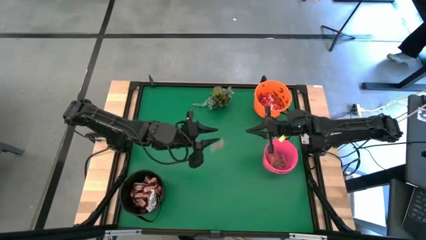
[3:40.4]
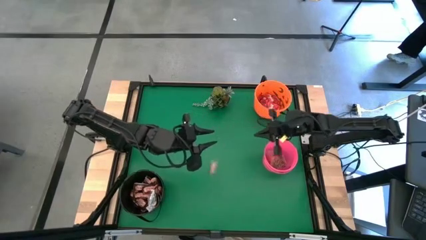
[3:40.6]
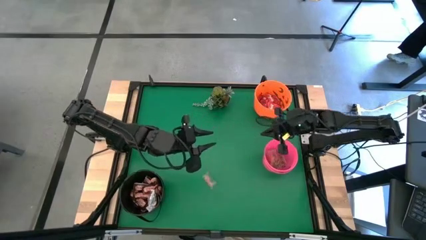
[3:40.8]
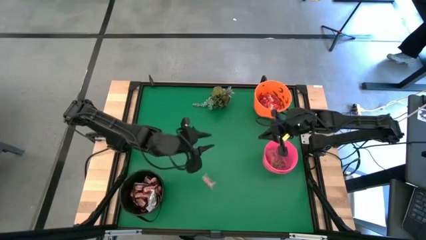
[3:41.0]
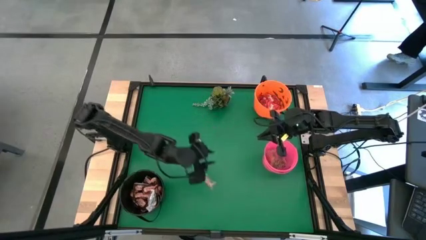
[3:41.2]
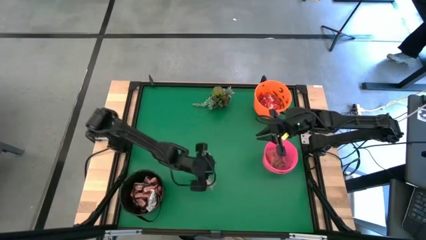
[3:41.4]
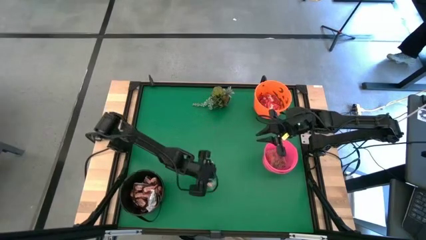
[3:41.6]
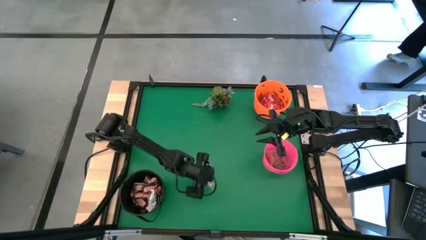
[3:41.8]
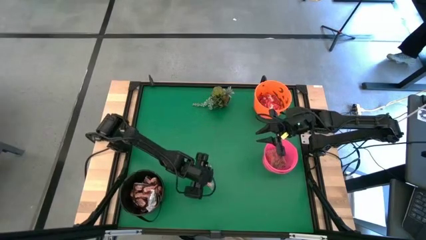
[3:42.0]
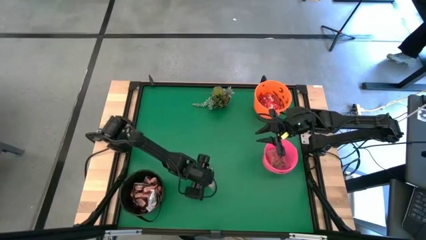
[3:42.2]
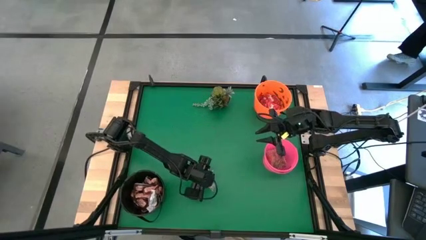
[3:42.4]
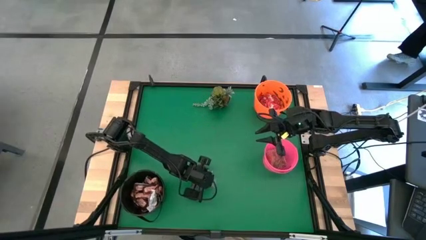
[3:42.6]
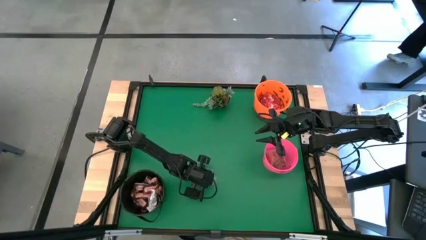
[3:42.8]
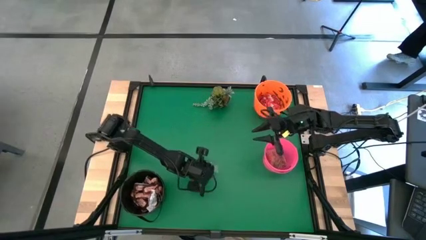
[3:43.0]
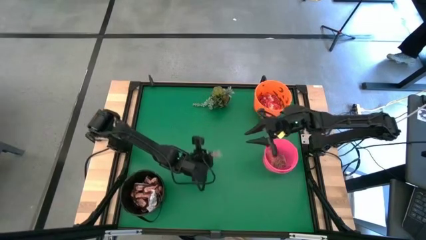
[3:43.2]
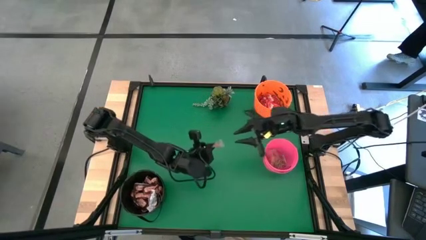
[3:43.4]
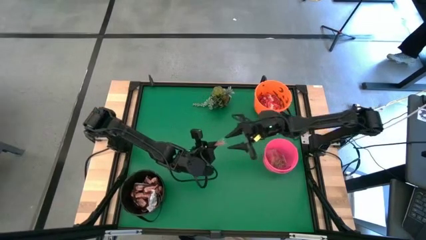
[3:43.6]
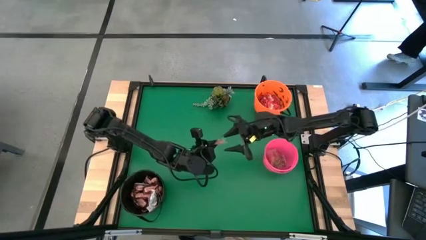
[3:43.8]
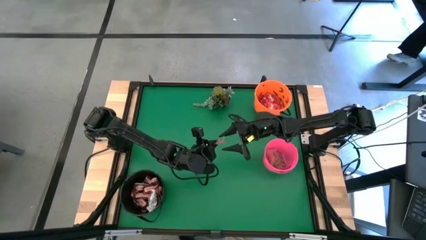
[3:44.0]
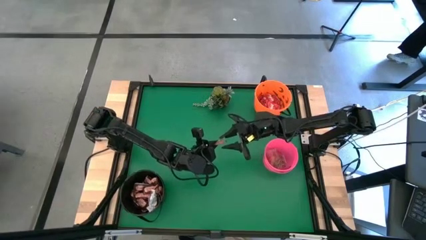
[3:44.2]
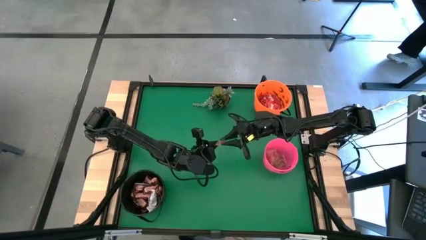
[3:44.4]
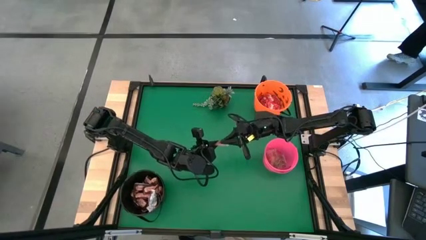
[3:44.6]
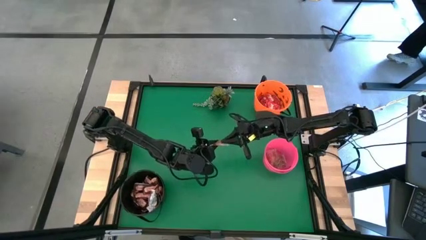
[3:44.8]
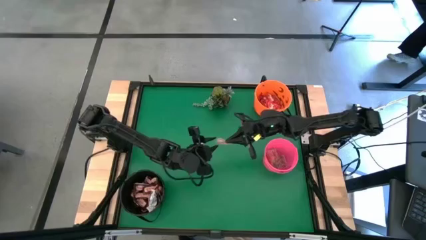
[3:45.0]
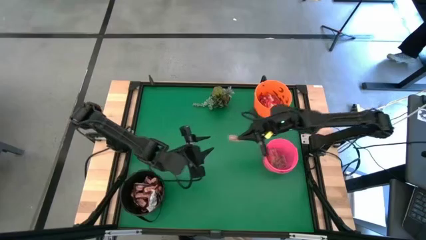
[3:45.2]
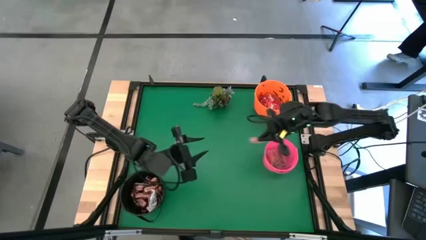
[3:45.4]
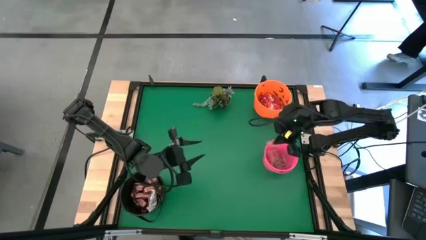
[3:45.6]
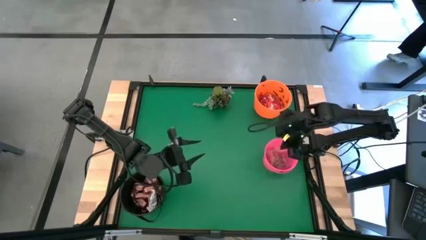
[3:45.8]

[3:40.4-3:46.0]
Task: Sort candy
Put the orange candy into the pink bucket

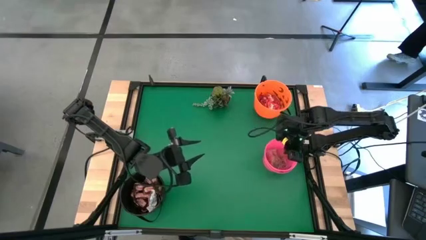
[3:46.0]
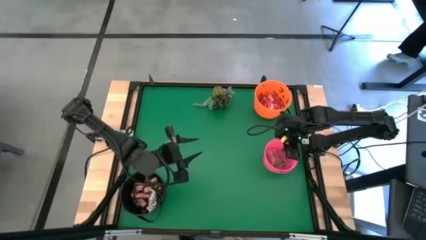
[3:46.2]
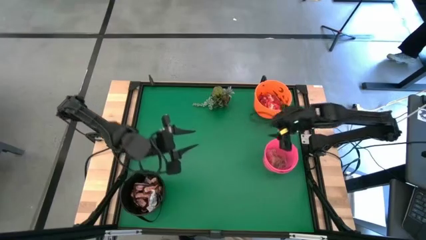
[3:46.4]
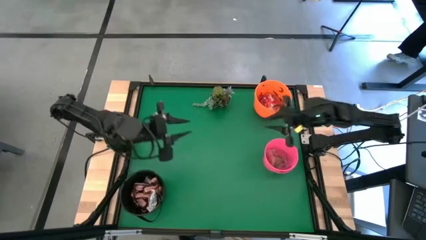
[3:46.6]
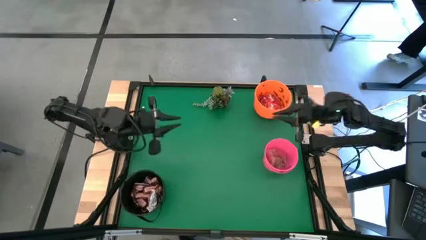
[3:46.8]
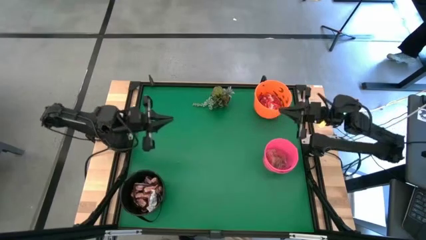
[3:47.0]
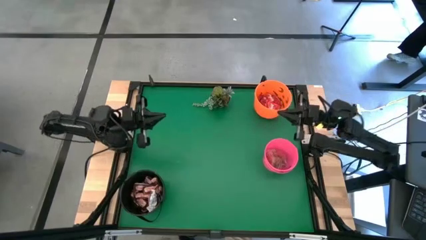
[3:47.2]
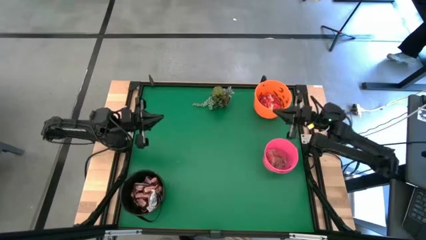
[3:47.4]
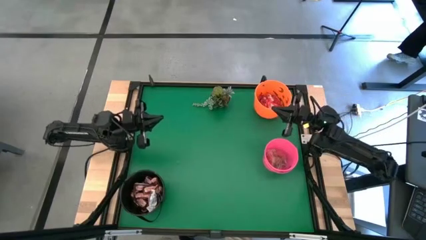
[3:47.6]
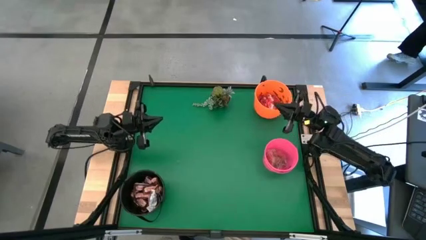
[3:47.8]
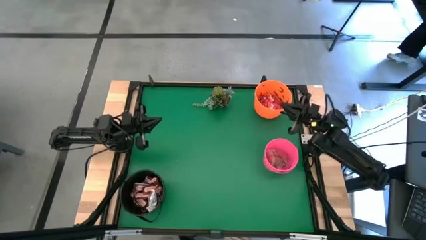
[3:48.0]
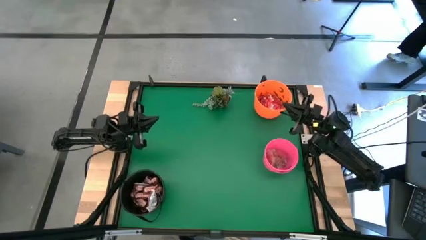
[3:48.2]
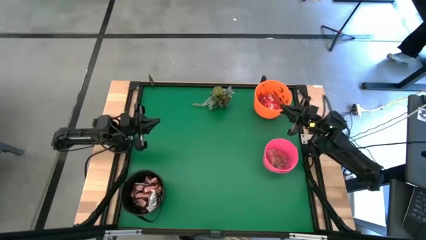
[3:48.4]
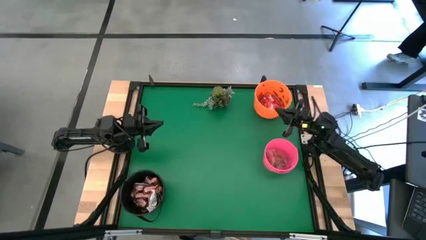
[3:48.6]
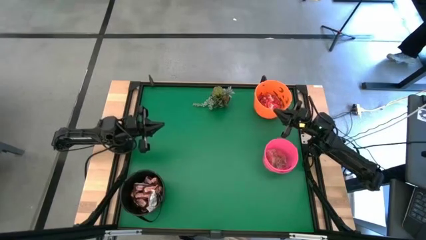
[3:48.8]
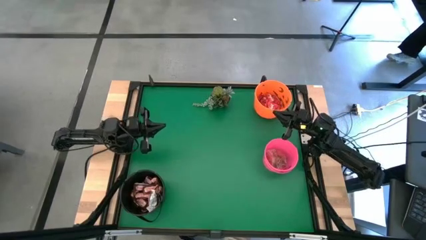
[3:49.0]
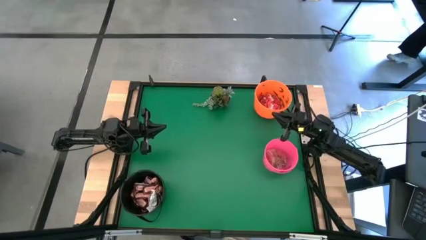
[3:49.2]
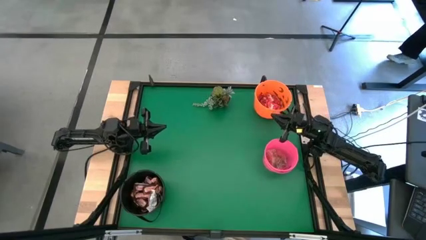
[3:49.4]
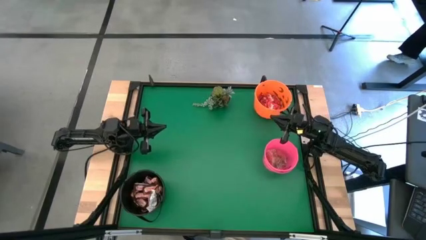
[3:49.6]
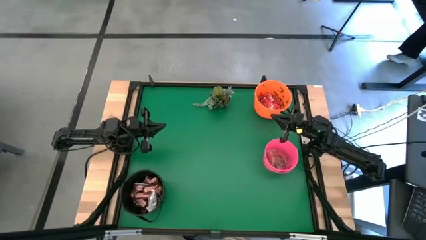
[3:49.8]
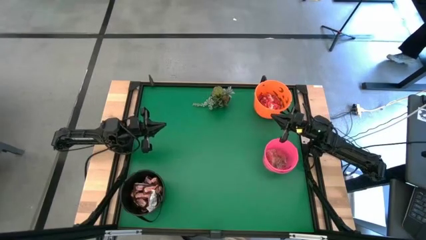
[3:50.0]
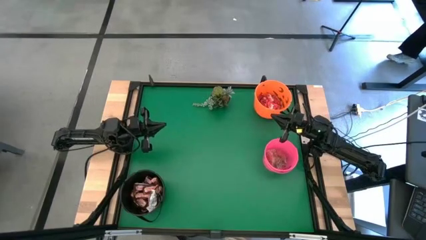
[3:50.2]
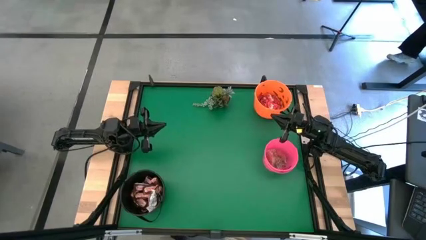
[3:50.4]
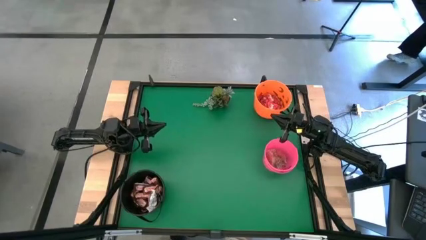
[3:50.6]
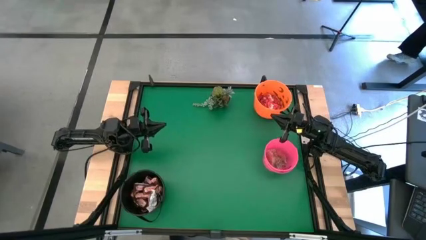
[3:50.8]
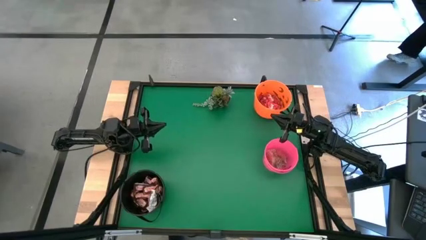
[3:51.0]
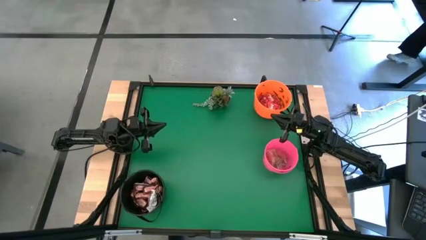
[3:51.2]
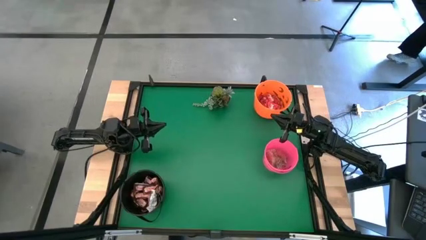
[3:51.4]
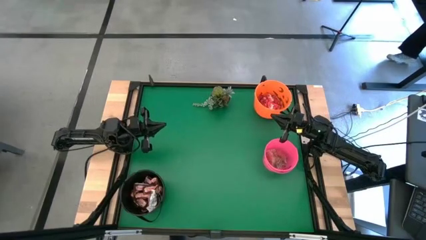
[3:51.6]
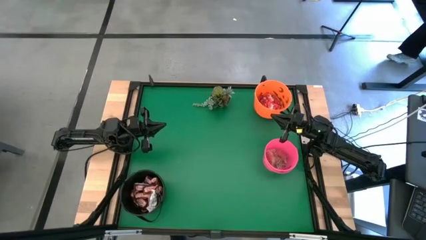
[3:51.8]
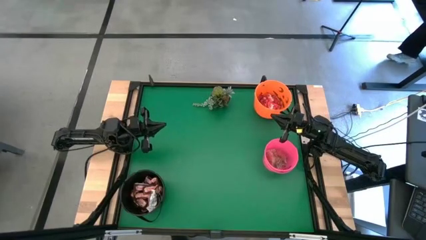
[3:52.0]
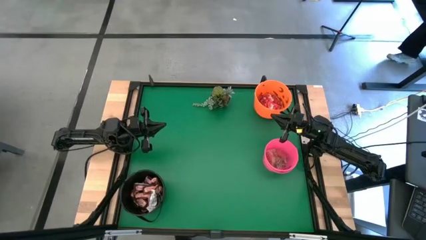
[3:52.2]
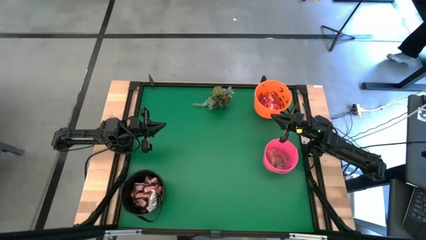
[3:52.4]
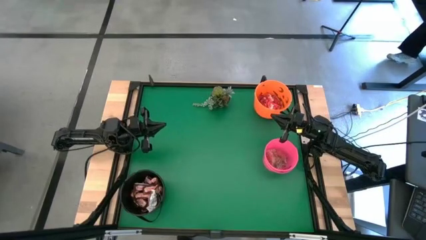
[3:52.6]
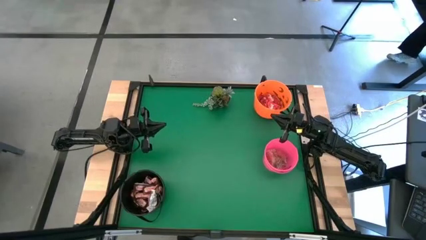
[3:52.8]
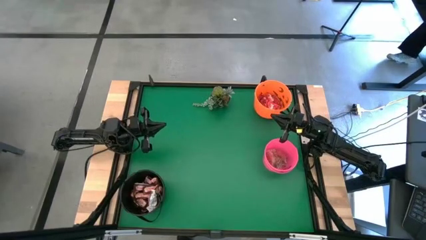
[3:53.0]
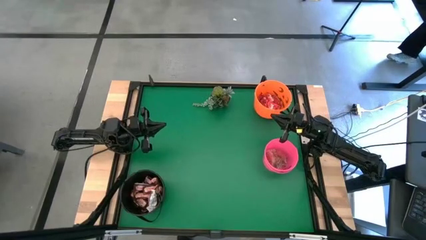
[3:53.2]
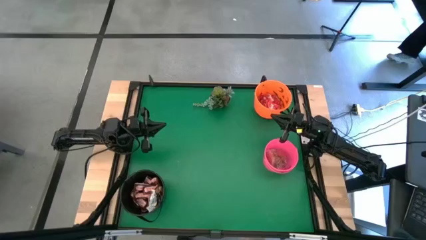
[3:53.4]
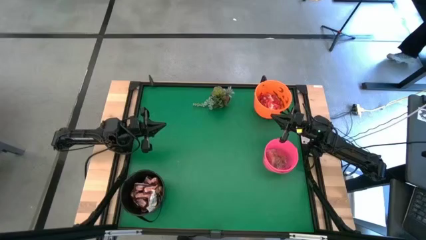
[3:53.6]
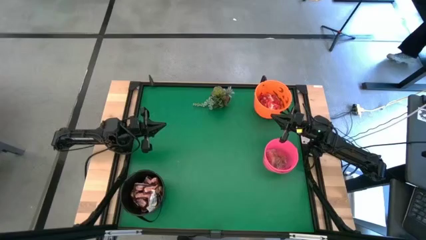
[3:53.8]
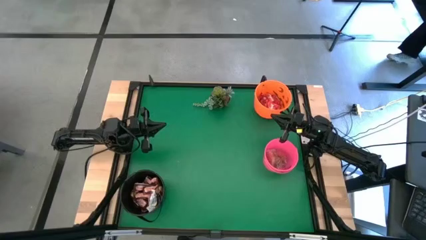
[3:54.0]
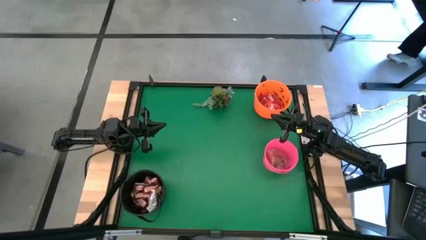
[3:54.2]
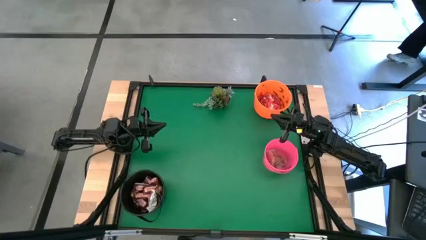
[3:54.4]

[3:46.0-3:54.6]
Return to Home Position

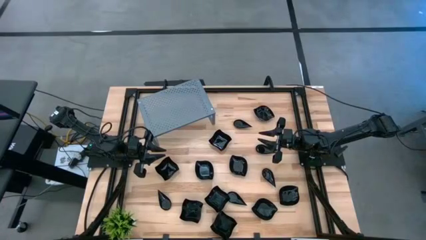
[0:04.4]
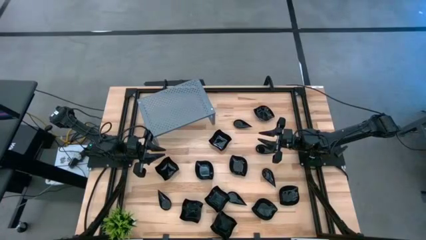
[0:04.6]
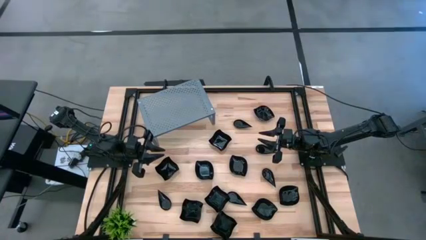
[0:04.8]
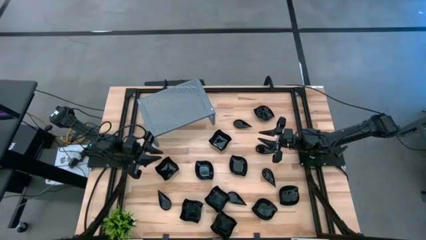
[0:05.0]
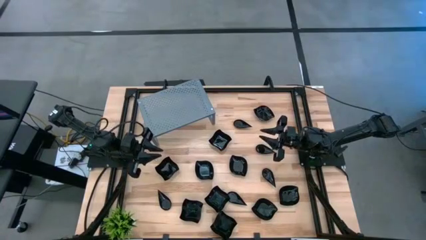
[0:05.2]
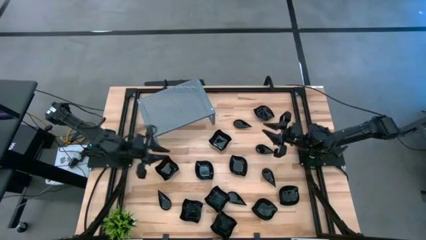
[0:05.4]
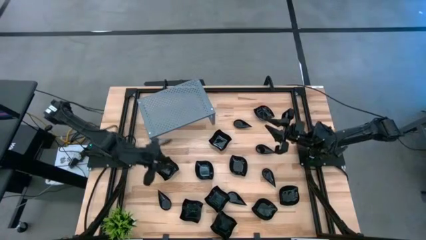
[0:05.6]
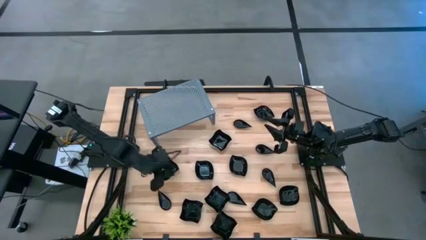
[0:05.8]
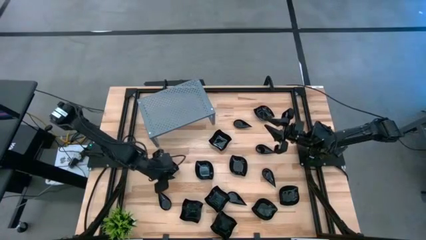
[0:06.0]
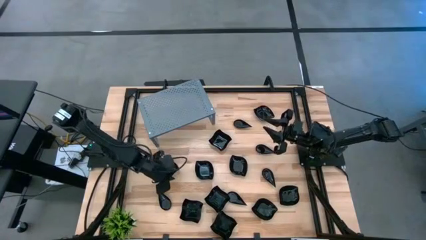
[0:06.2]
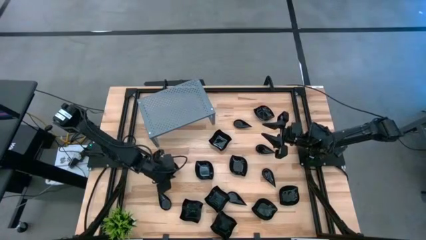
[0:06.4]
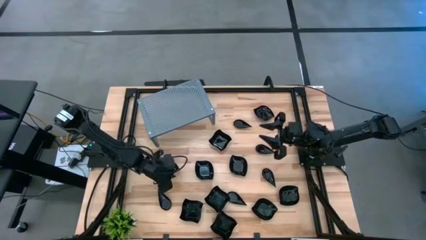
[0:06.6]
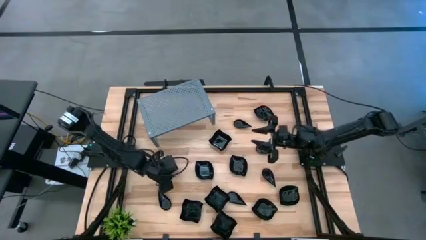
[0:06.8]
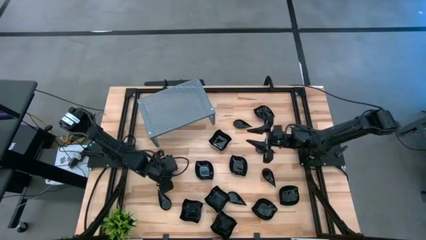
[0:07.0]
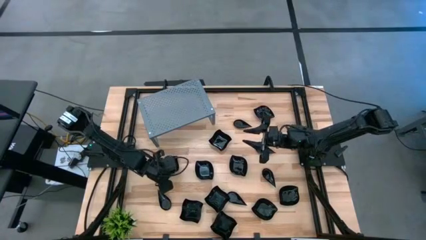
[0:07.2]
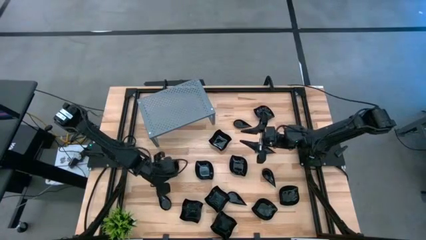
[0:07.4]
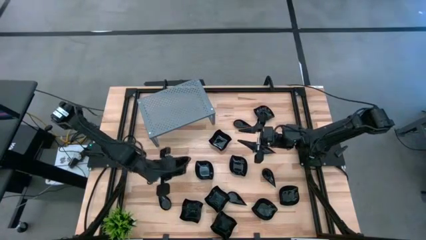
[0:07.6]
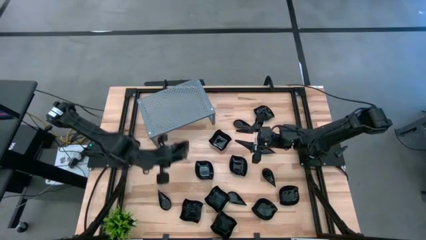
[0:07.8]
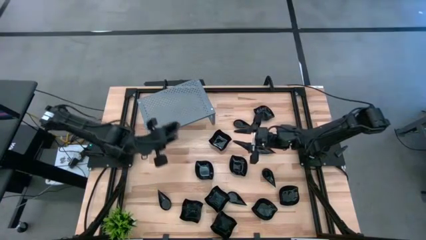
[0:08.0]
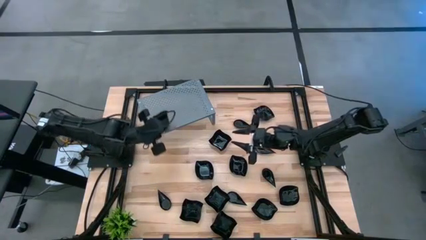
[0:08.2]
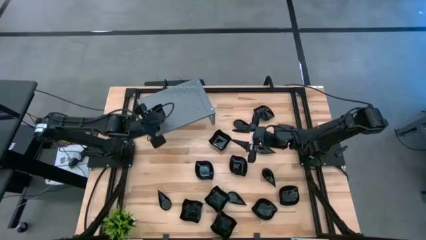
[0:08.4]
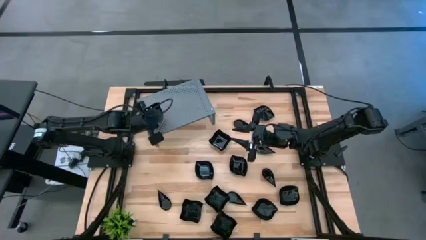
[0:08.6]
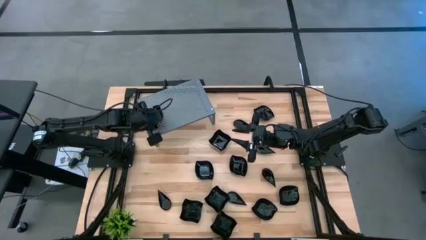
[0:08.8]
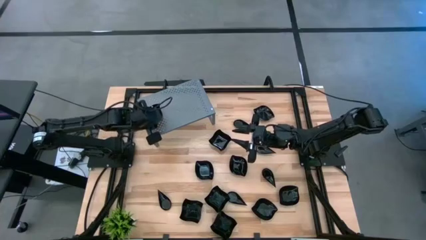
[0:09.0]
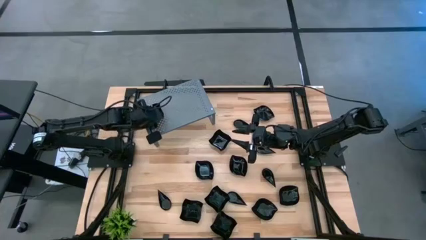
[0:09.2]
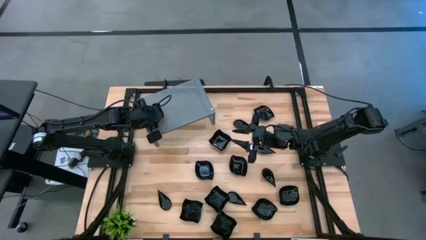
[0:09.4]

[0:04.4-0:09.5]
Task: Pick & Place Mini shaped plates
Put the black distorted square plate on the shelf
